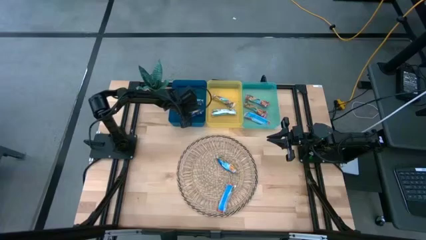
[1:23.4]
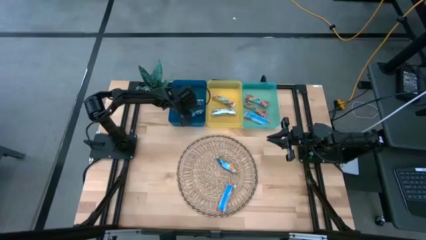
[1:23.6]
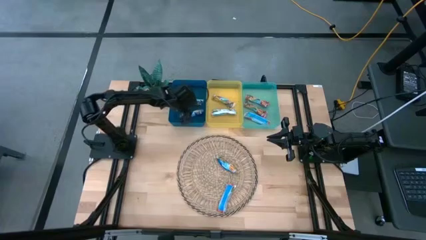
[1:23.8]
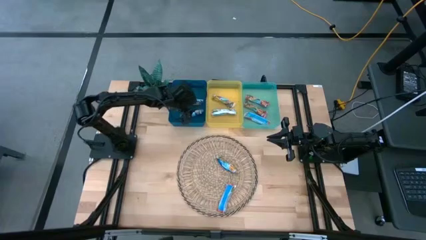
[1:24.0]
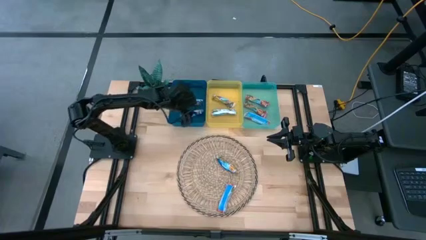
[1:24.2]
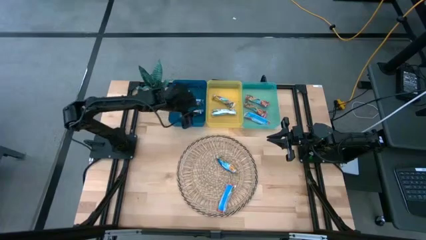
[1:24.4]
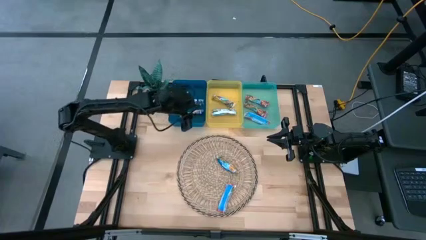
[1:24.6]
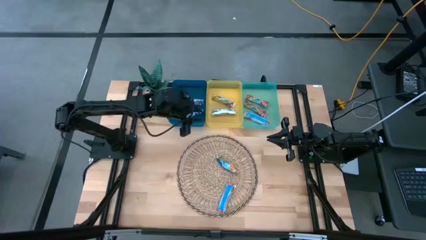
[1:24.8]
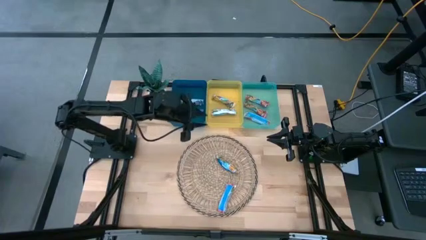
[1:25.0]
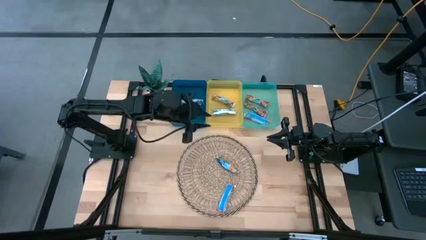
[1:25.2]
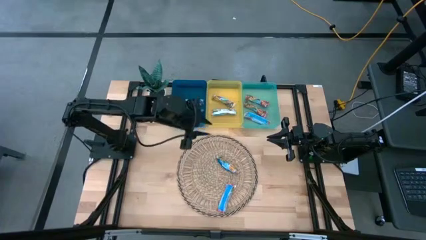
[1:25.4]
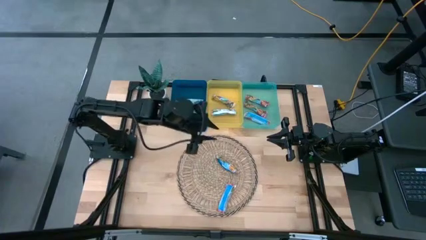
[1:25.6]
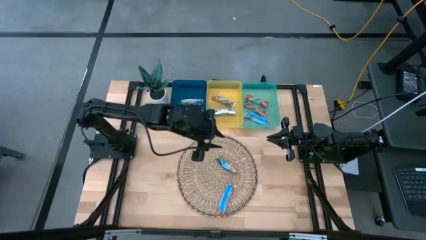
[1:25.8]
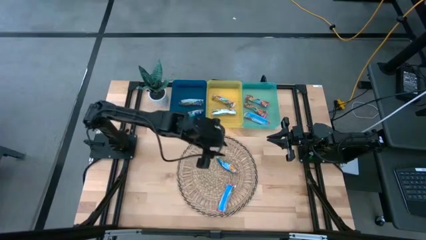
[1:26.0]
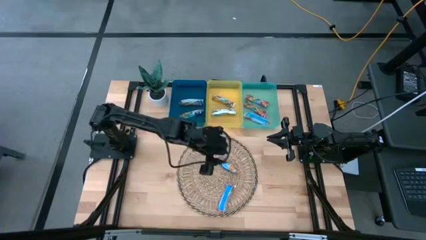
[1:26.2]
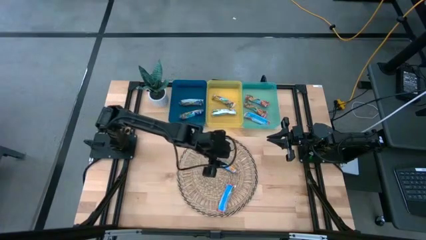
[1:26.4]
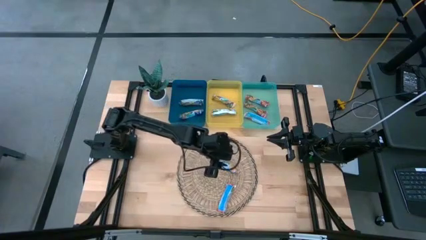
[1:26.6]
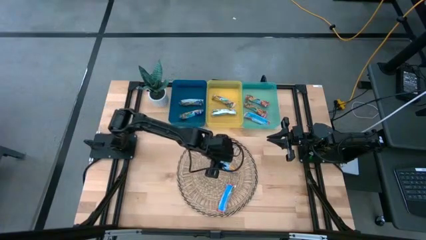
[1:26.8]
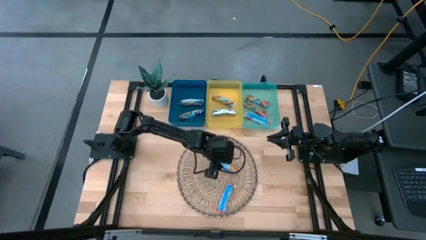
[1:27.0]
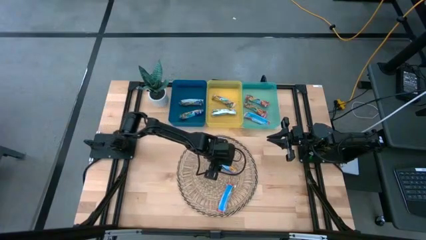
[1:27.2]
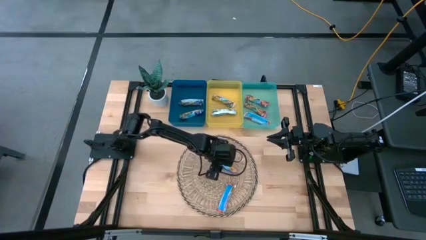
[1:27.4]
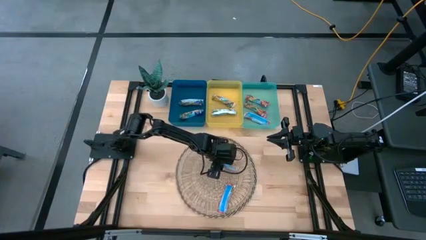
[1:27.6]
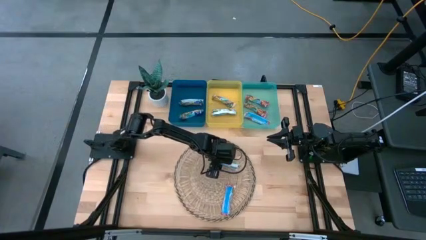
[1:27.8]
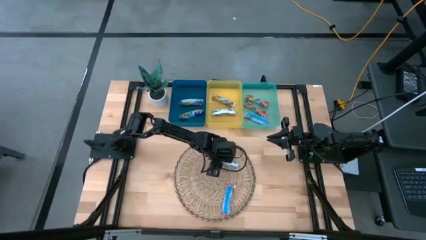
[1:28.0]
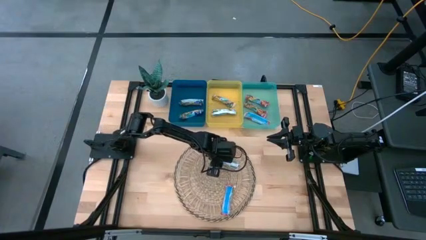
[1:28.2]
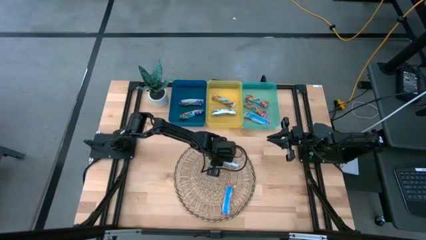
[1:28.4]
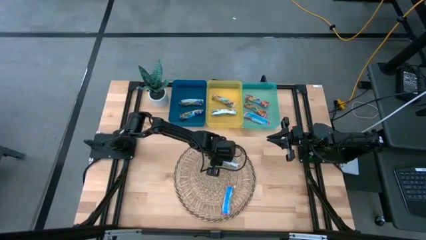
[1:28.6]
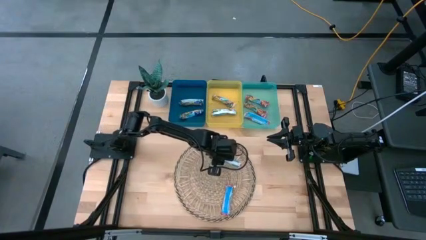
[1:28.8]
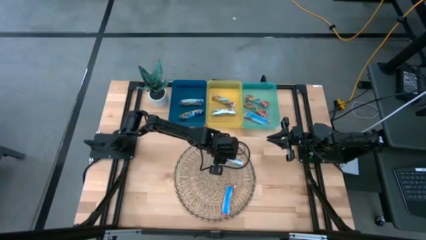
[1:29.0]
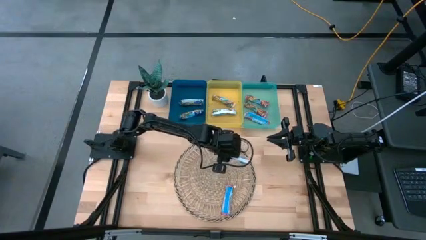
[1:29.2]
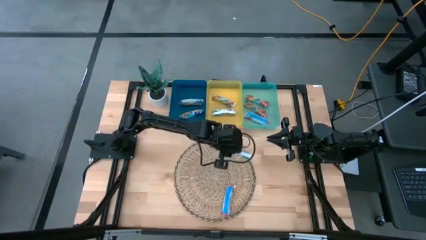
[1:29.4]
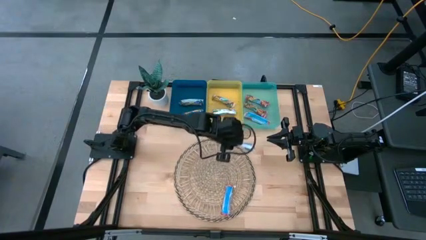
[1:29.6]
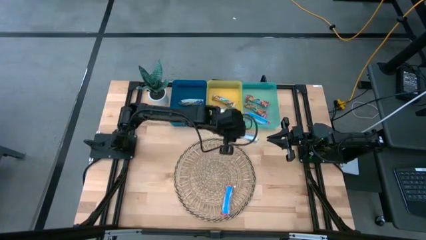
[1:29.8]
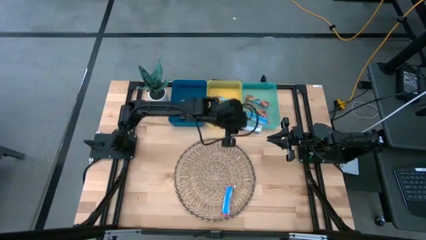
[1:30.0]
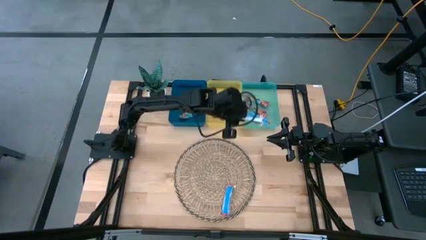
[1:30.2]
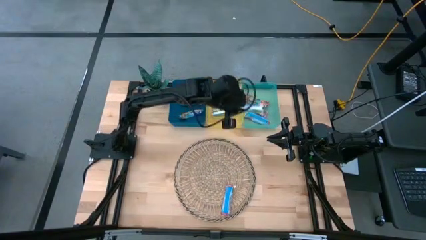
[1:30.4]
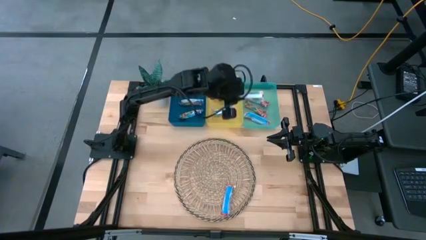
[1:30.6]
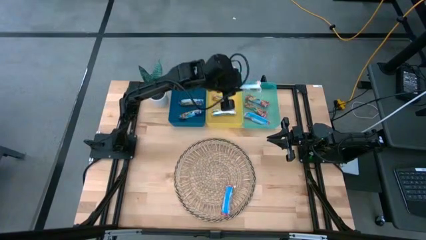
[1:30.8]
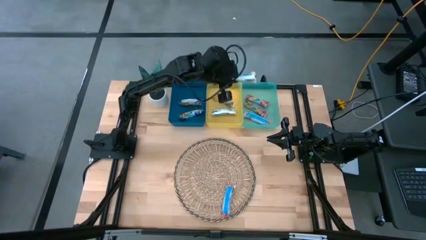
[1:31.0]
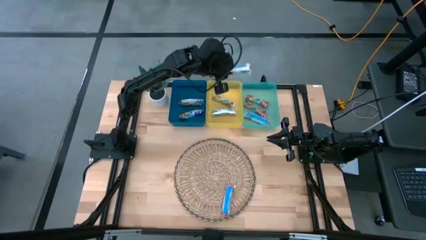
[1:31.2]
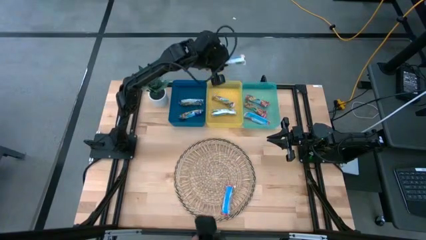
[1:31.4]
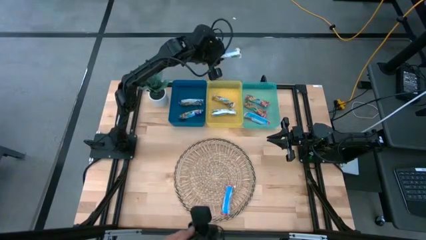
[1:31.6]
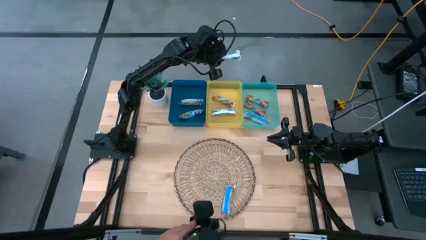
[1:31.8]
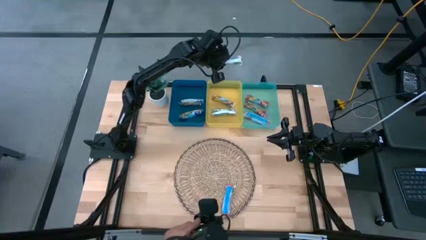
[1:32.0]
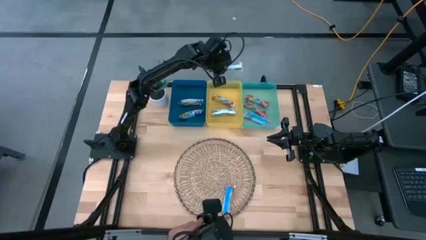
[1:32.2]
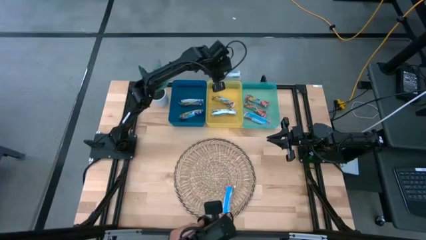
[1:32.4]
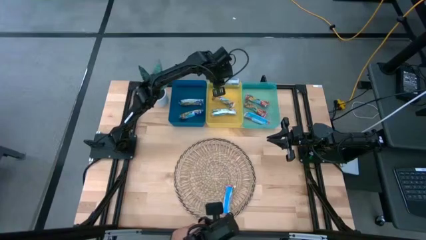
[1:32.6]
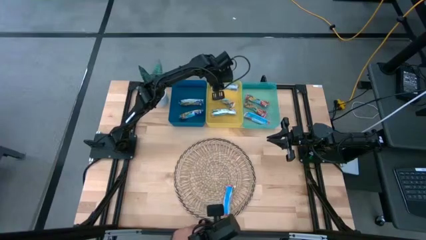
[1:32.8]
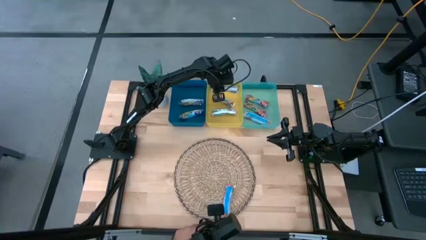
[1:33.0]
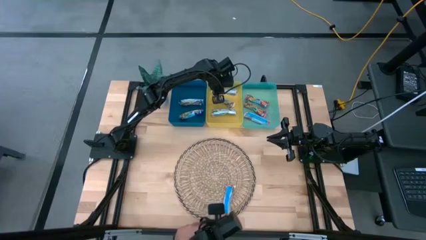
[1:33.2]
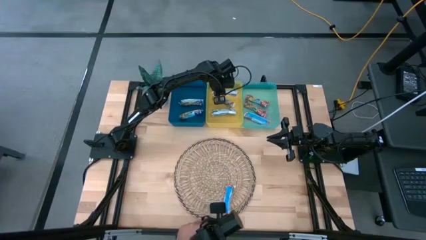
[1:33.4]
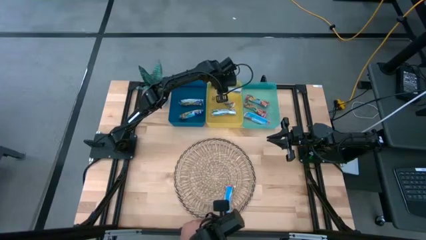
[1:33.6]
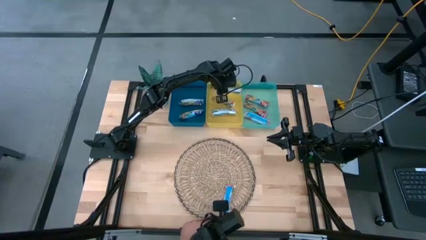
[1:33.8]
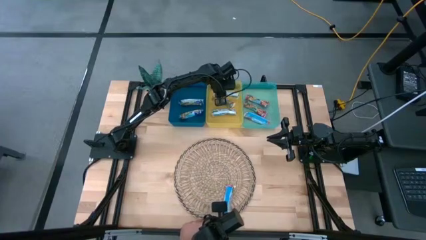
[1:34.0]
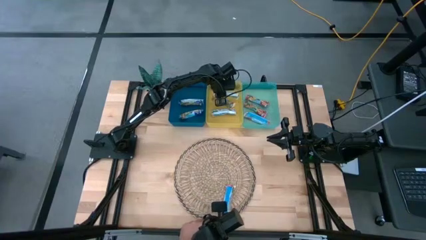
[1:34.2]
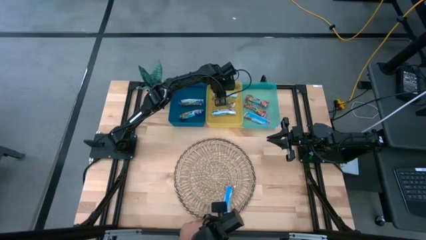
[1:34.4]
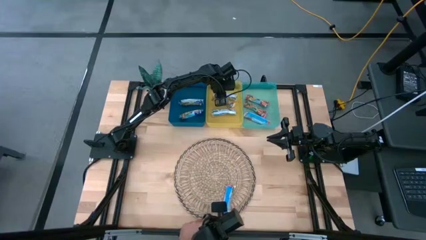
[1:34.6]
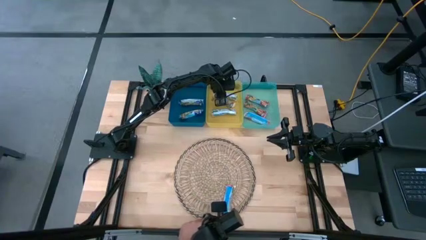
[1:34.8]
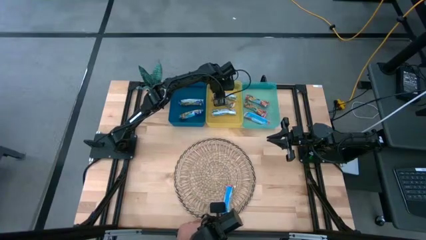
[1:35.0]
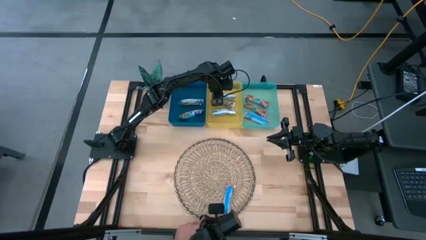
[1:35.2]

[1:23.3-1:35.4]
Task: Pick and place Granola Bars by type
Put the yellow granola bar into the yellow bin

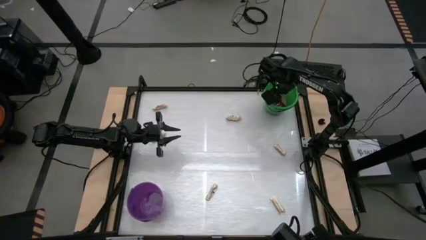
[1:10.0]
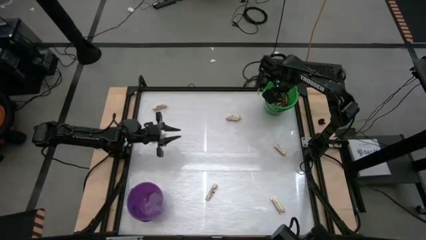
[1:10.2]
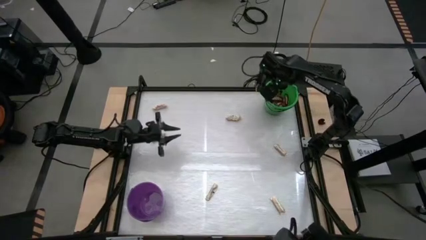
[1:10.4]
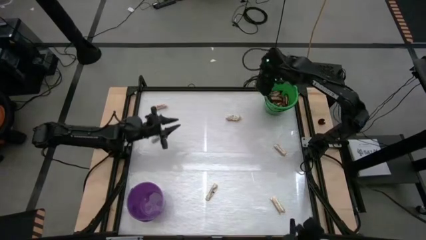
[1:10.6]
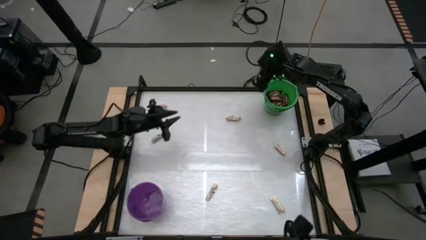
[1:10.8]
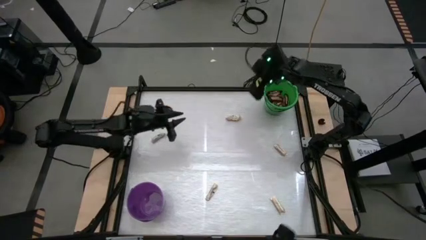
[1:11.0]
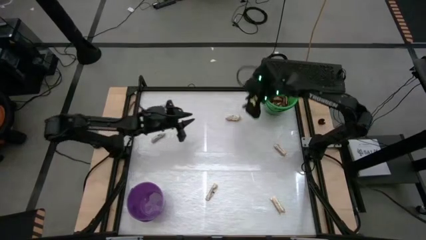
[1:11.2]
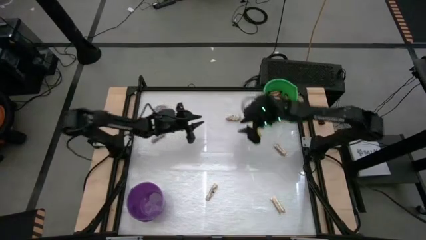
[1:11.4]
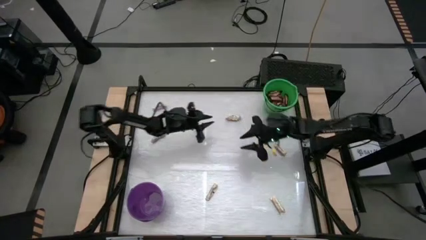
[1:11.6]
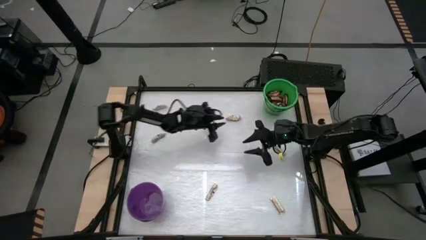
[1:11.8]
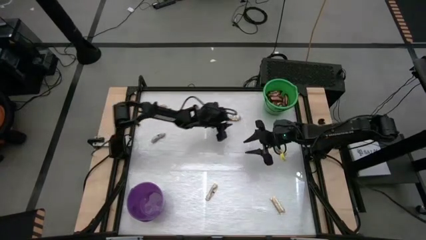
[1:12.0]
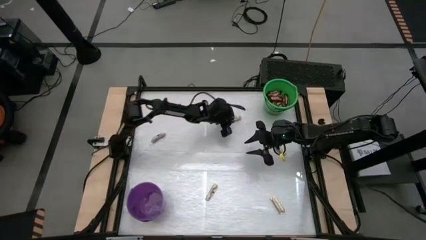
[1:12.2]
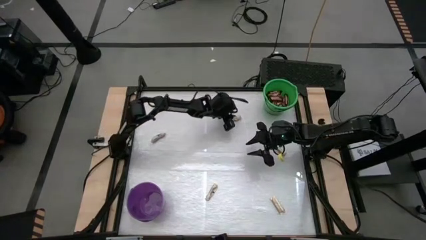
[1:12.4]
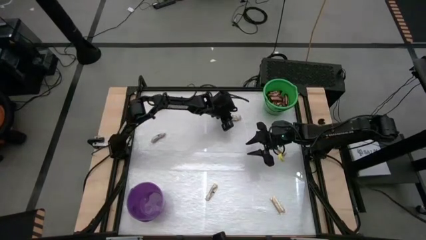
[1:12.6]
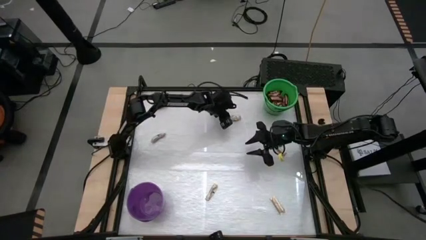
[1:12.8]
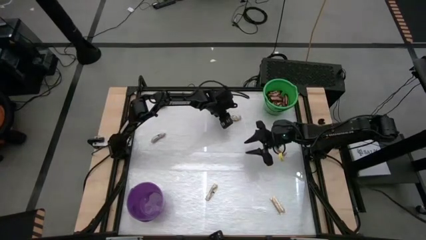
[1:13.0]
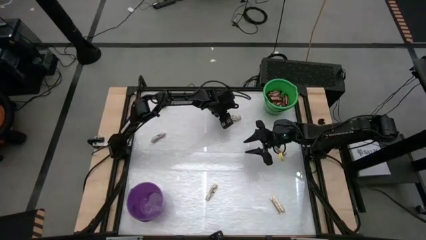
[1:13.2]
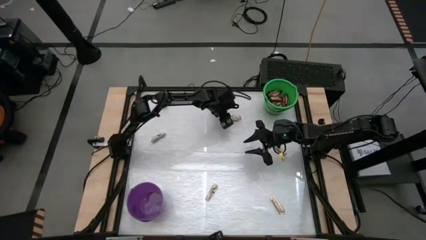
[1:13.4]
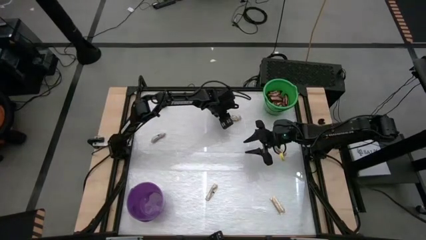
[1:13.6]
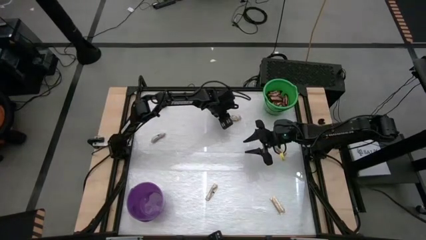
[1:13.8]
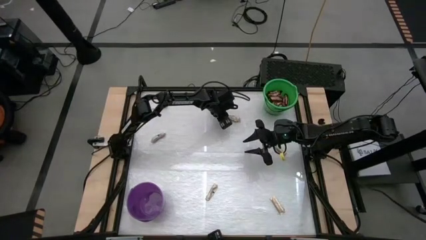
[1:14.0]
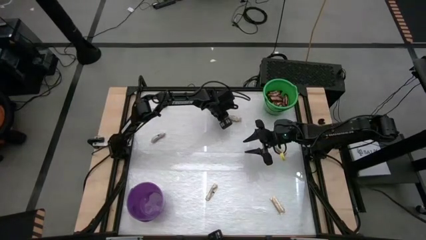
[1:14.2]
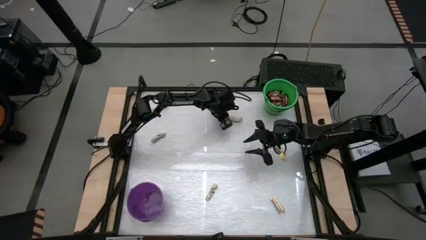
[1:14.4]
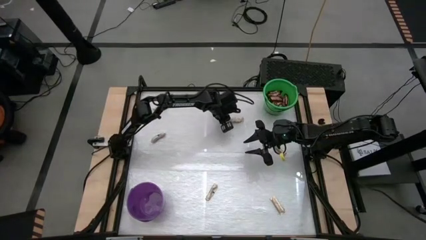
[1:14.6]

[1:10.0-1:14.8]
Task: Sort candy by brand, put in halloween buckets
Put the white candy bar into the purple bucket
